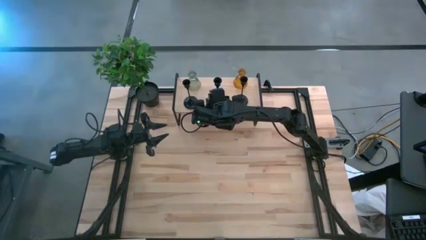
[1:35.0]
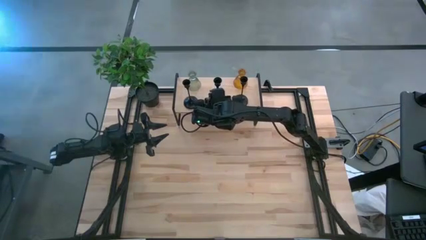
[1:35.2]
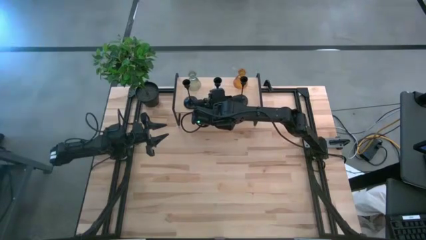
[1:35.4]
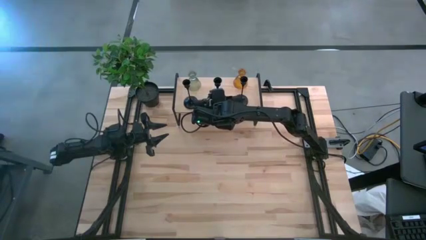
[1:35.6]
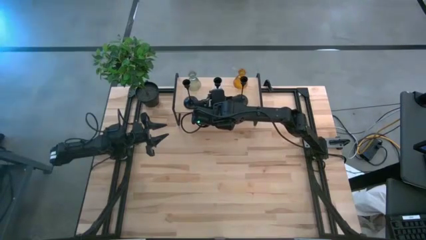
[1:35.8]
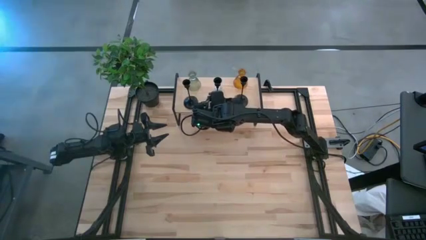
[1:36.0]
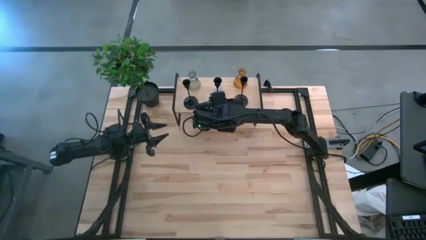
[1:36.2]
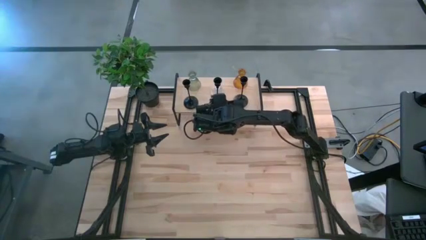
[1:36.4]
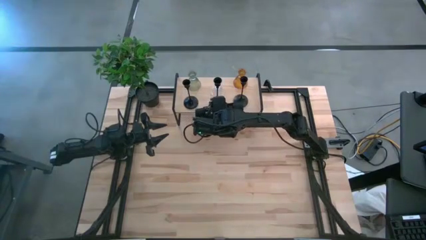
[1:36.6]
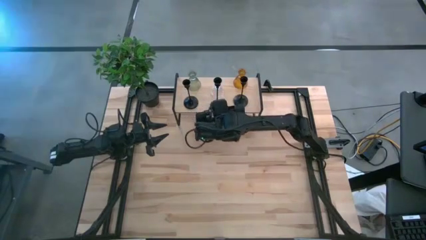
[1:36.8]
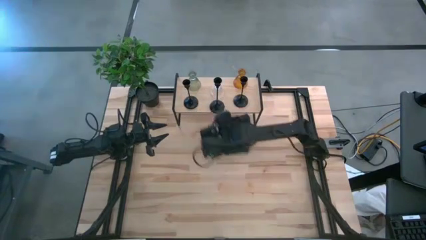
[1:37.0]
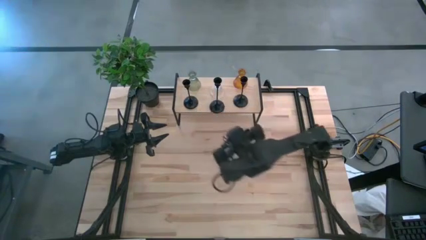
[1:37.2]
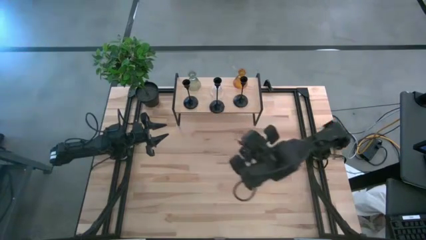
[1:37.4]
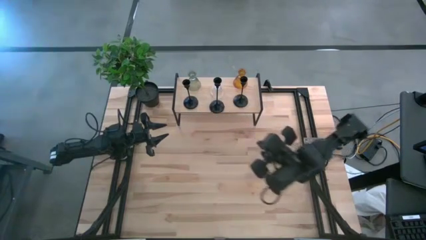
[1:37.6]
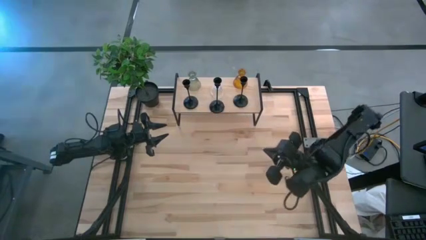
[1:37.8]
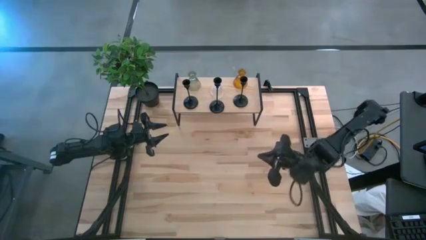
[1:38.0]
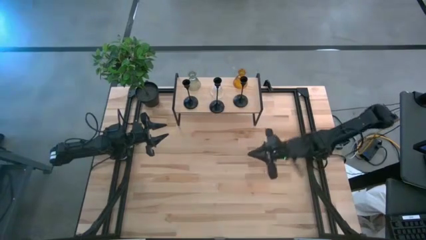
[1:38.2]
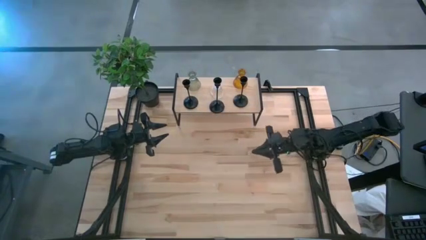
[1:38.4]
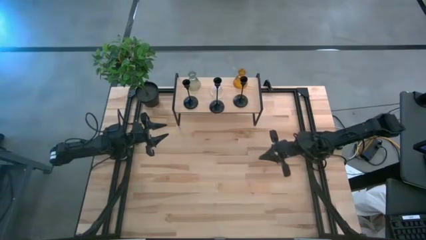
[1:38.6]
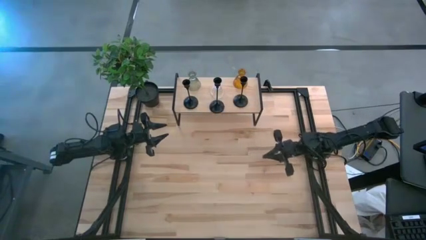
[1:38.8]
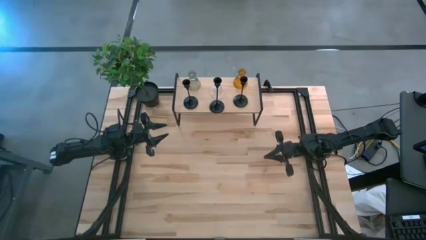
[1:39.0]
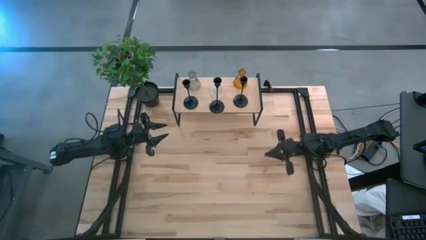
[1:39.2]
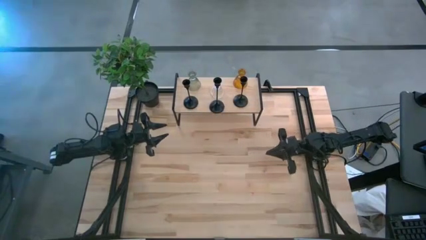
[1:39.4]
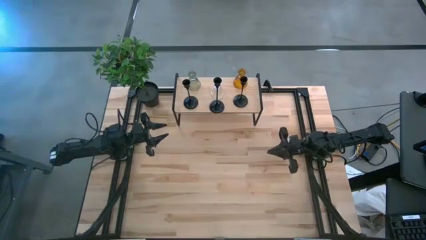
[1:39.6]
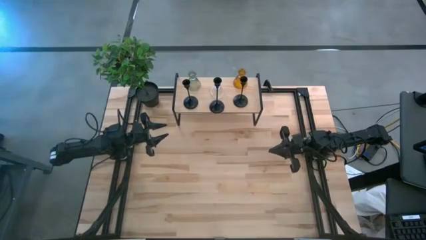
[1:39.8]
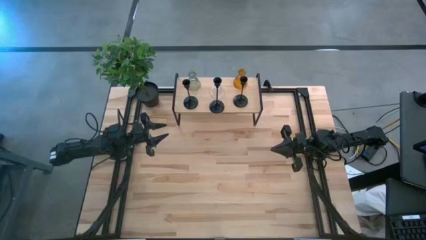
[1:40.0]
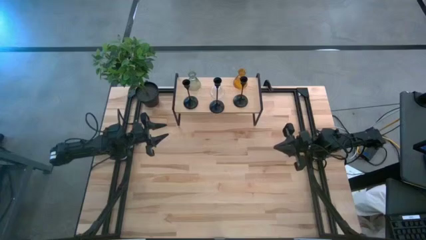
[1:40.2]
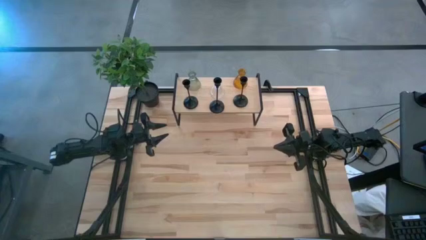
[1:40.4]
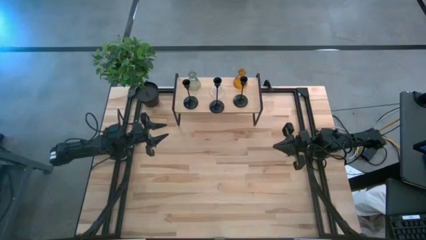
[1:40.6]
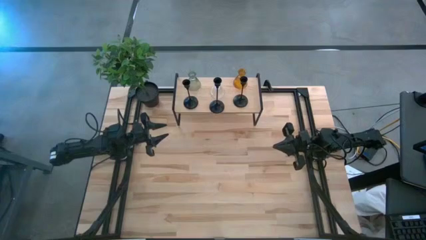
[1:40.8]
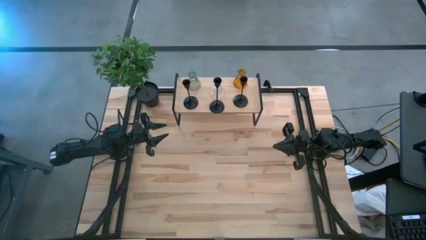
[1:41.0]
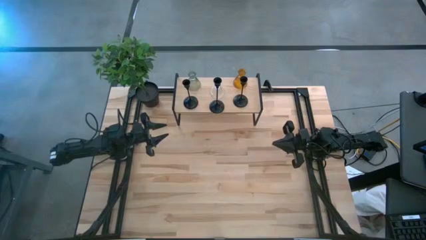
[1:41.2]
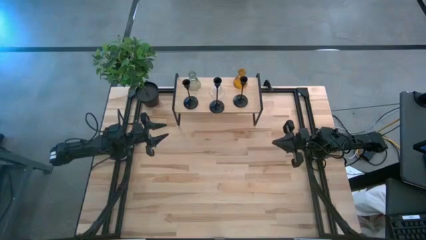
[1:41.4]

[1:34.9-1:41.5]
Task: Pick & Place candle stick holders
Return to Home Position

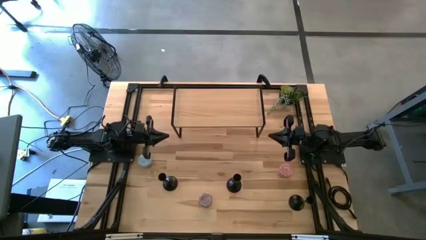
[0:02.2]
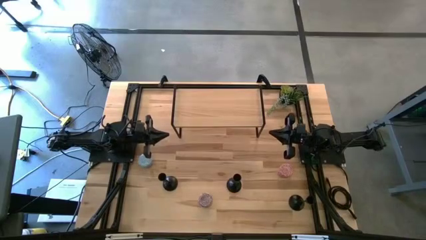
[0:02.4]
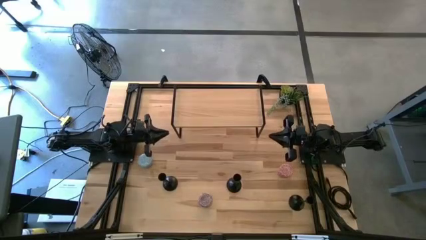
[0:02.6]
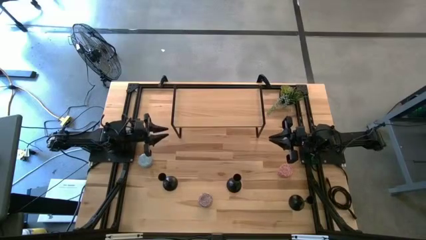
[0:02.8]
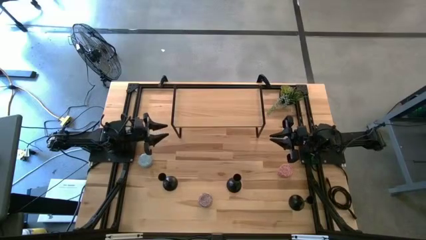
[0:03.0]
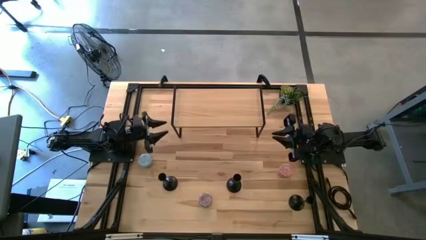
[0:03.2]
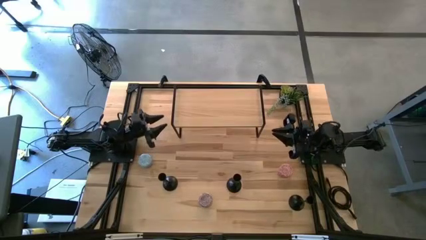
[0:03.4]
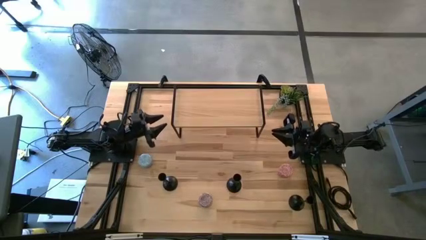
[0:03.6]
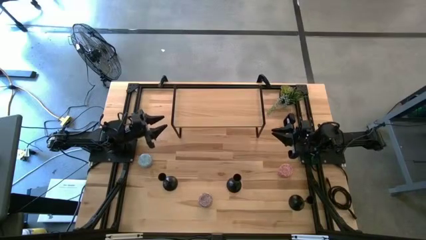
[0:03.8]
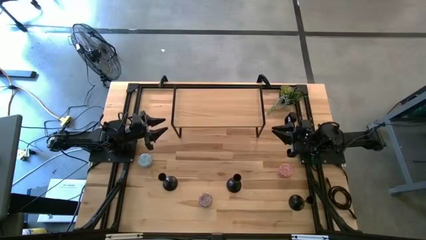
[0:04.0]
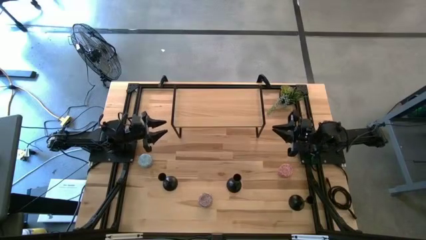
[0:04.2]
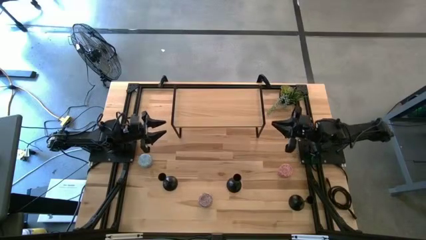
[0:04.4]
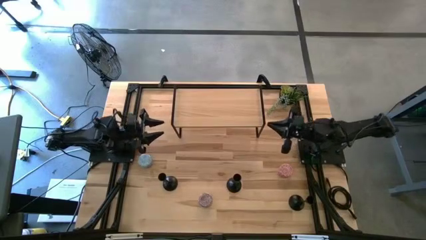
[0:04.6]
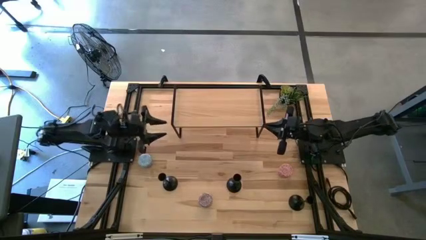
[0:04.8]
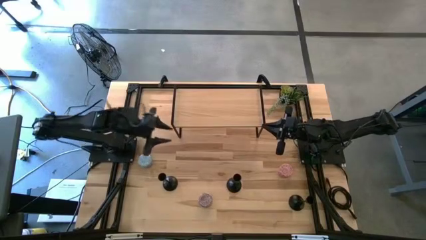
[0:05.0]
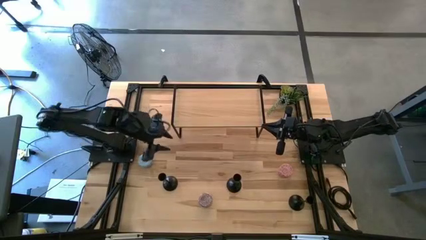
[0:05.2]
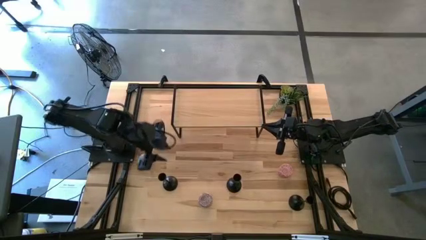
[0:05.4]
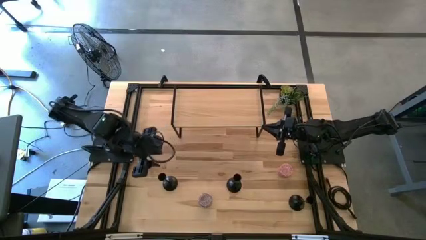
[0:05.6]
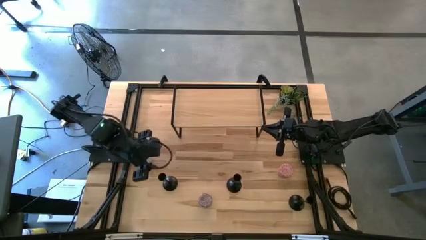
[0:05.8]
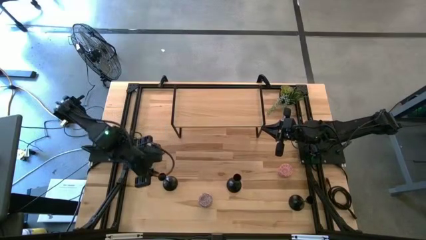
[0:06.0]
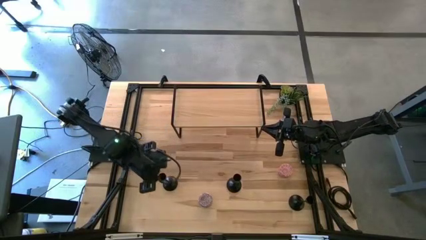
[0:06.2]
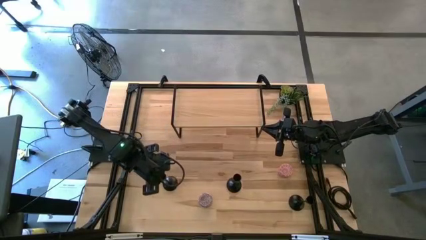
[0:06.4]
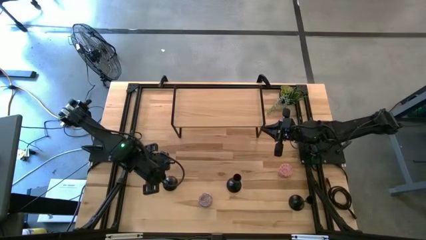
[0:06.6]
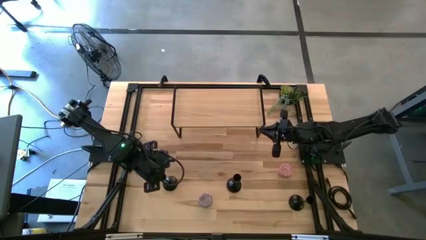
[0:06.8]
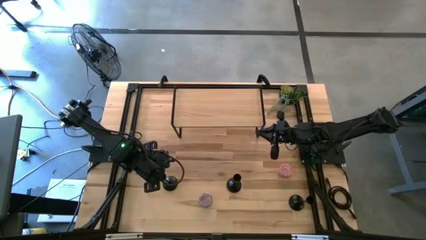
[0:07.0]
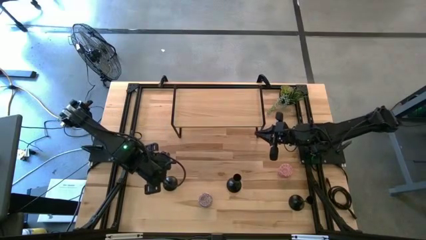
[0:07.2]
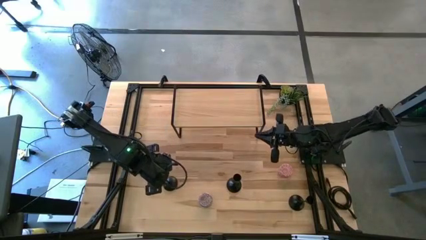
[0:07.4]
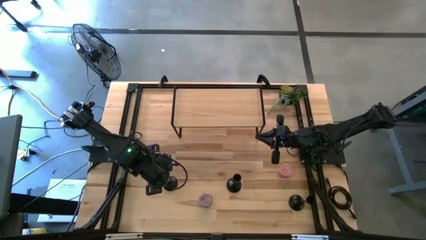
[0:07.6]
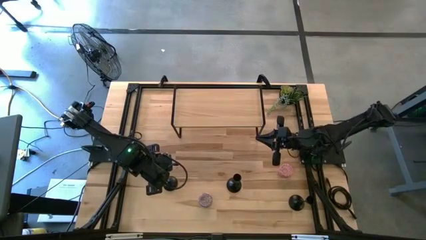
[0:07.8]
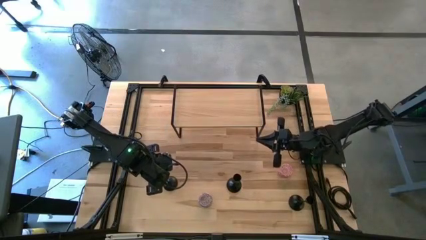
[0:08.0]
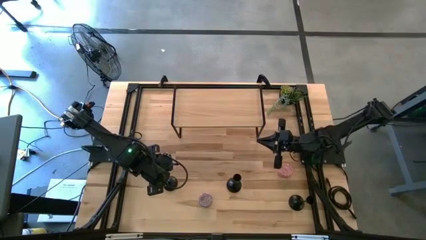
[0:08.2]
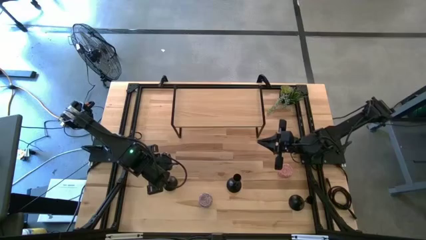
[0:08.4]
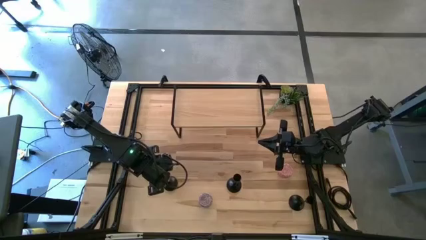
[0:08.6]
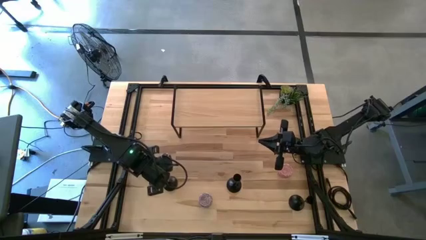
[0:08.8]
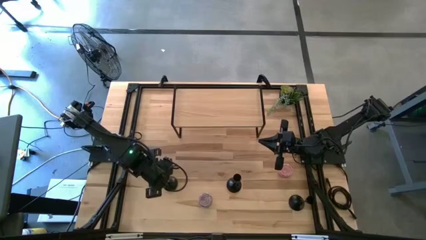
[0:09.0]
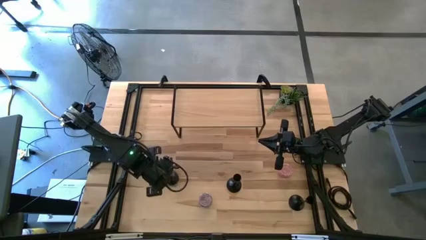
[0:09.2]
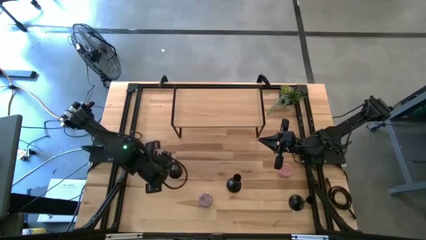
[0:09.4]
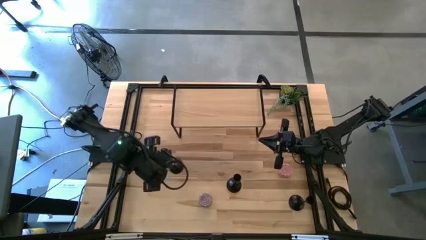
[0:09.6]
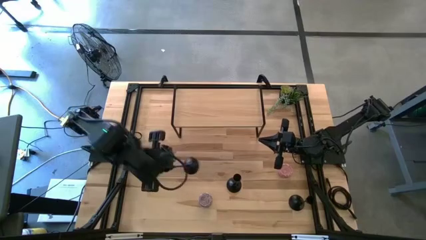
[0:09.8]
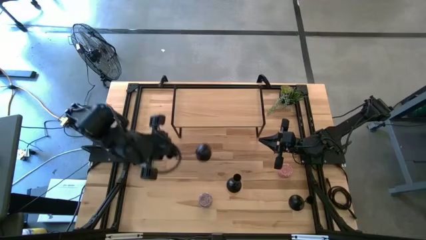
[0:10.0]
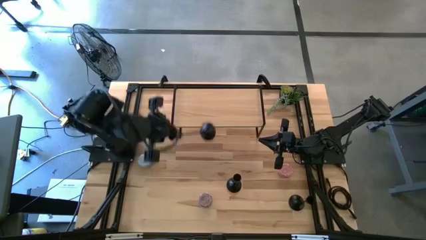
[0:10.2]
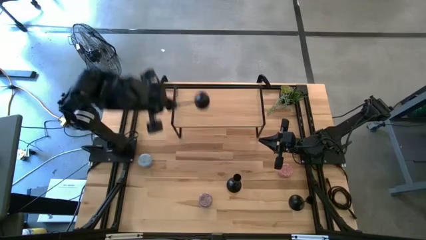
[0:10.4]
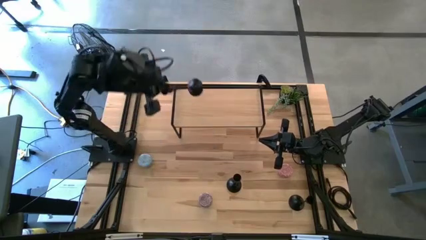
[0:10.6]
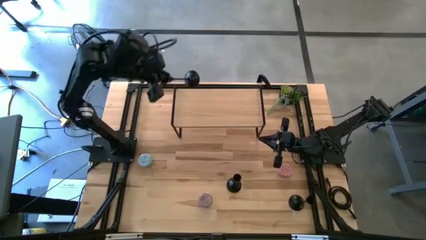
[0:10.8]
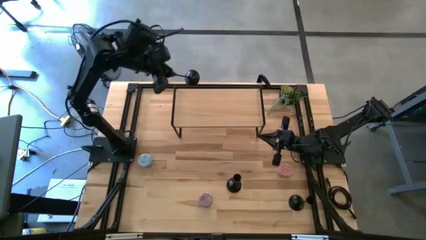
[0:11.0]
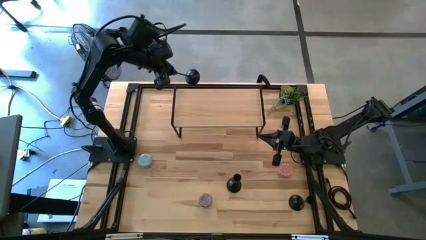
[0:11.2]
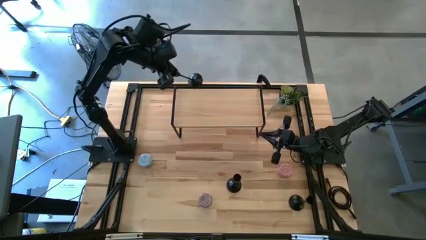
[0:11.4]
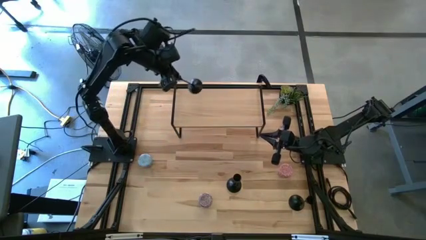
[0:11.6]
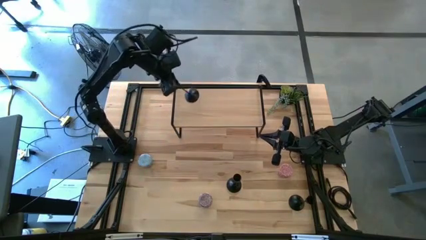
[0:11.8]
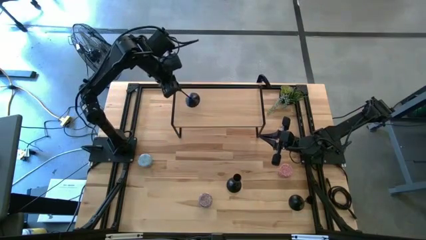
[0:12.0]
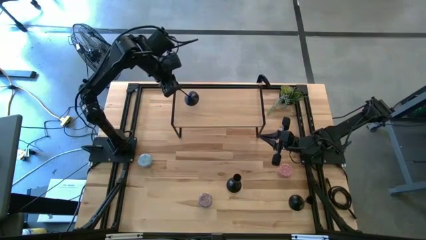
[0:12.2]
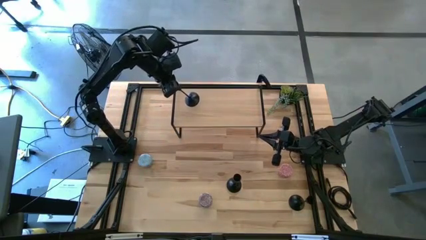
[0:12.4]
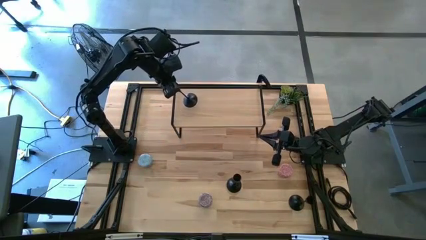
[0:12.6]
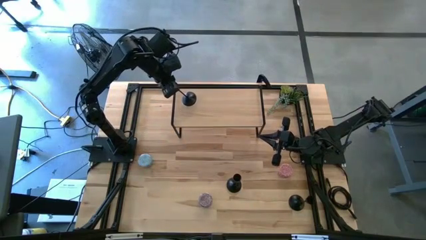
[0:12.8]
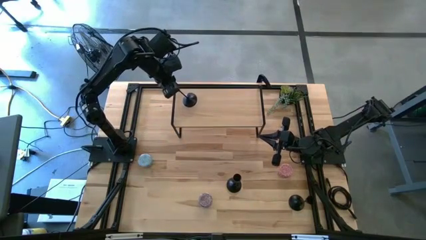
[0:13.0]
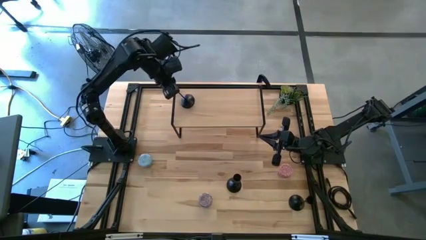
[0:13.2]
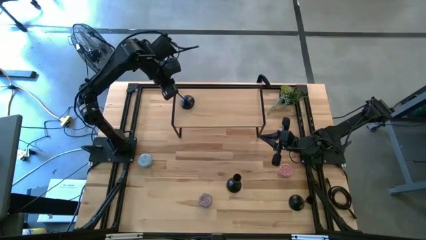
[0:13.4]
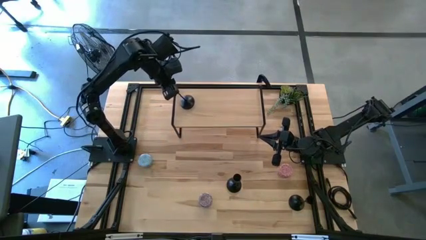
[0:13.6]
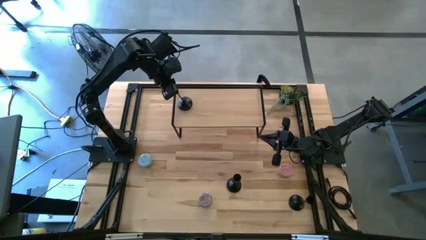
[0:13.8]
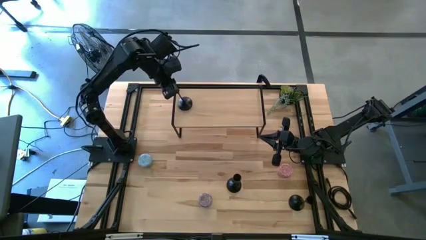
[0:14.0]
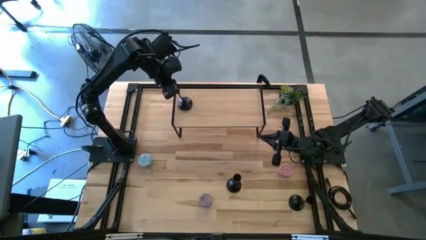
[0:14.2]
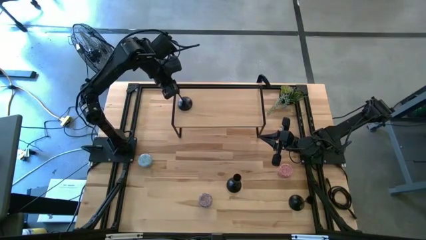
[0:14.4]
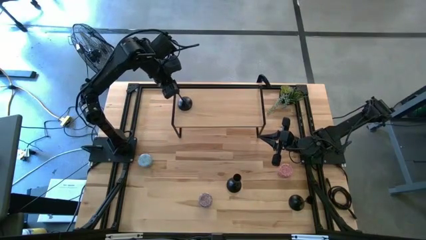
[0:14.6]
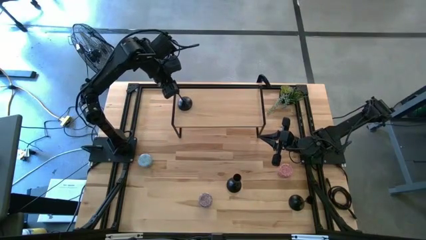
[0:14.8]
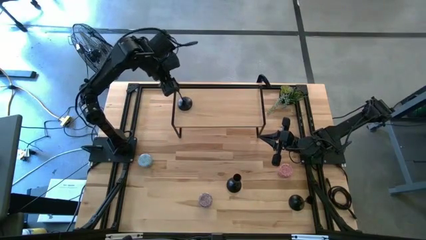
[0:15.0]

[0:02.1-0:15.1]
Task: Pick & Place candle stick holders
Put the left black candle holder on the shelf
